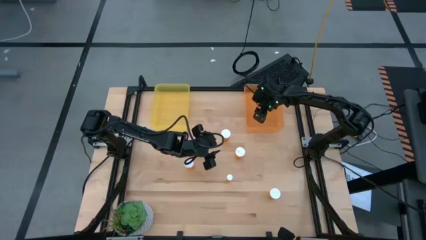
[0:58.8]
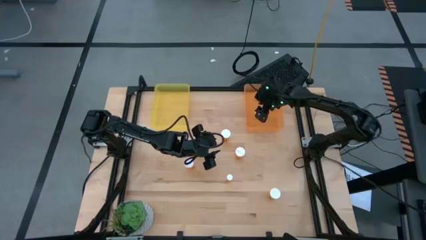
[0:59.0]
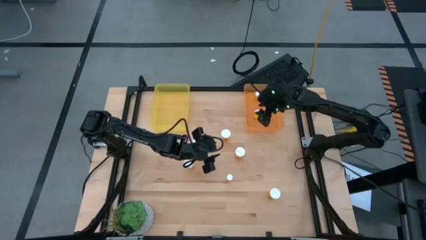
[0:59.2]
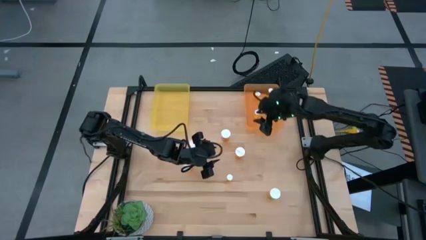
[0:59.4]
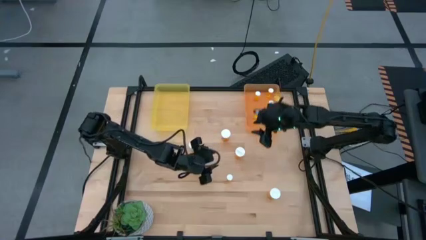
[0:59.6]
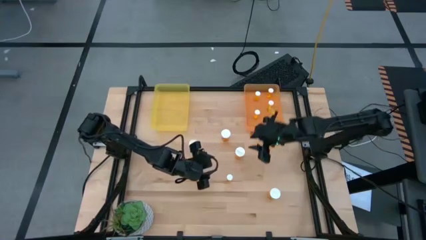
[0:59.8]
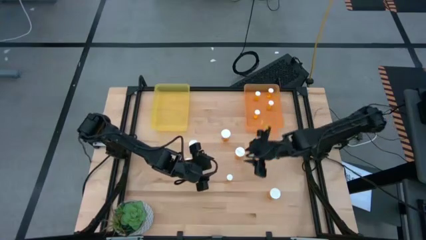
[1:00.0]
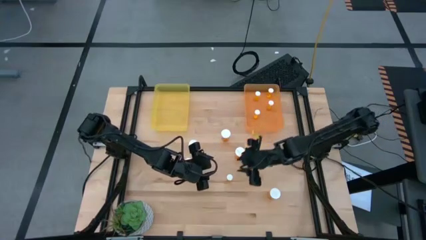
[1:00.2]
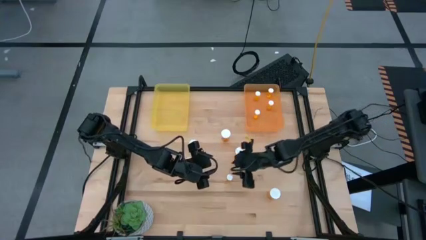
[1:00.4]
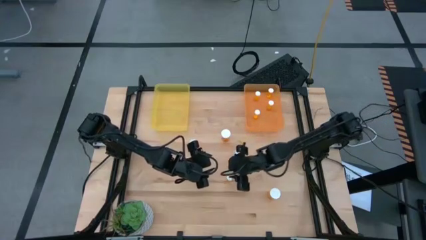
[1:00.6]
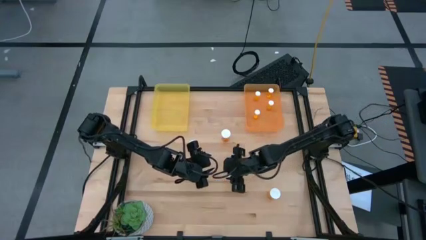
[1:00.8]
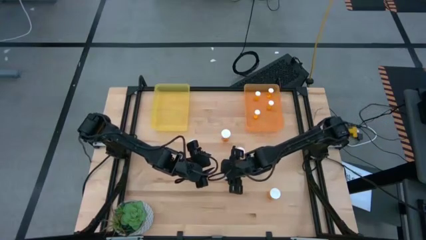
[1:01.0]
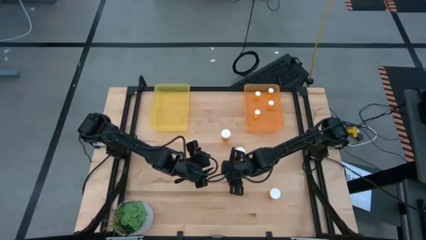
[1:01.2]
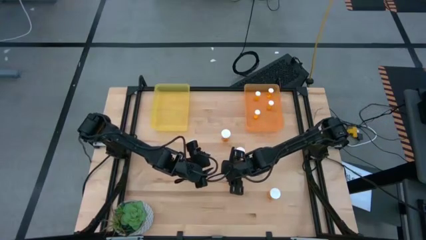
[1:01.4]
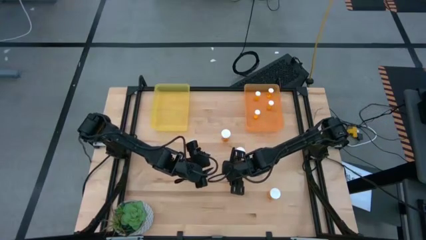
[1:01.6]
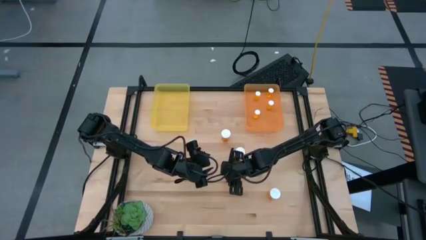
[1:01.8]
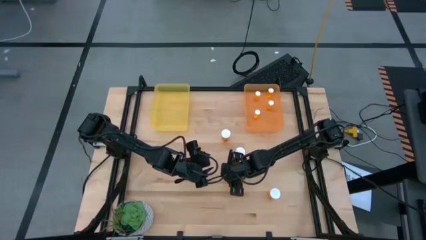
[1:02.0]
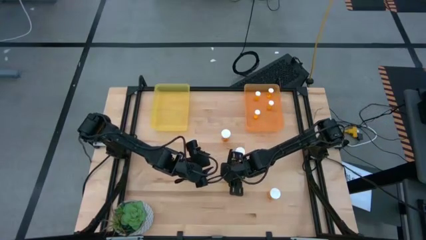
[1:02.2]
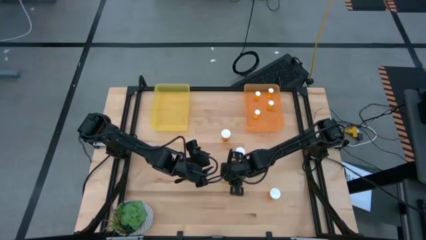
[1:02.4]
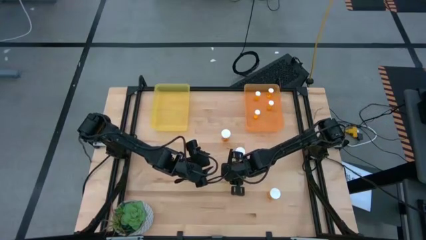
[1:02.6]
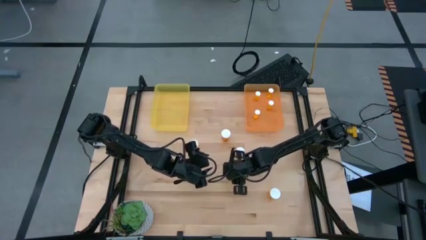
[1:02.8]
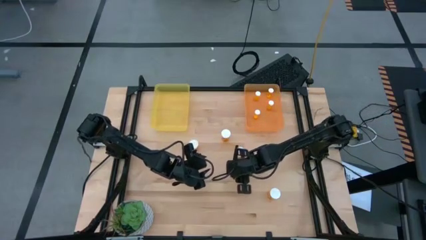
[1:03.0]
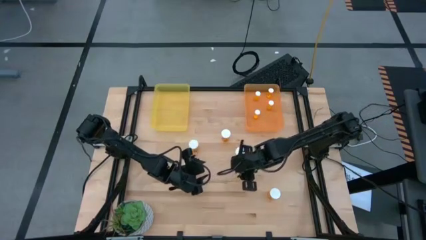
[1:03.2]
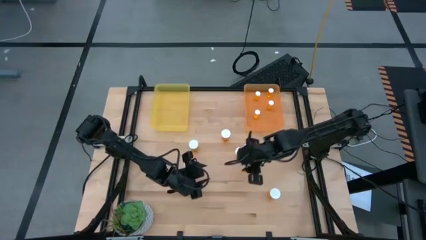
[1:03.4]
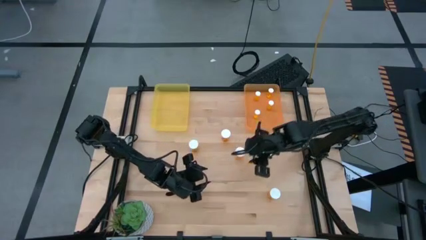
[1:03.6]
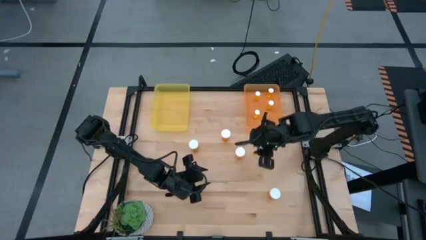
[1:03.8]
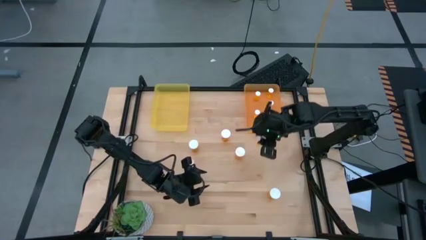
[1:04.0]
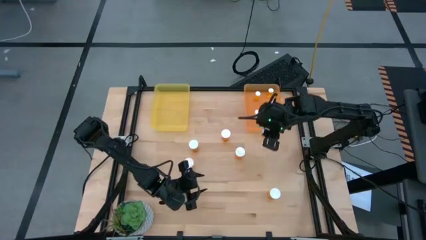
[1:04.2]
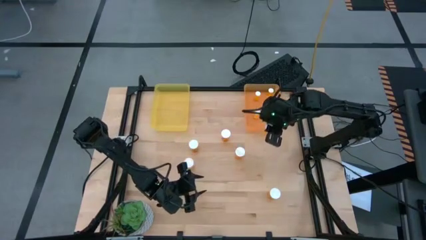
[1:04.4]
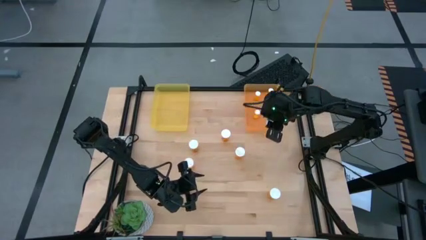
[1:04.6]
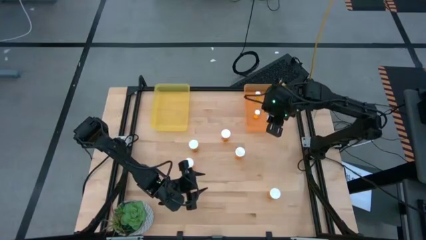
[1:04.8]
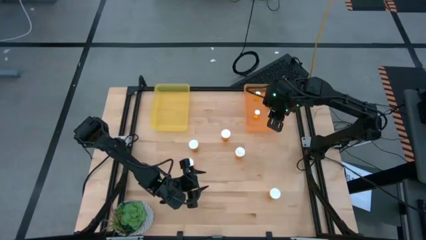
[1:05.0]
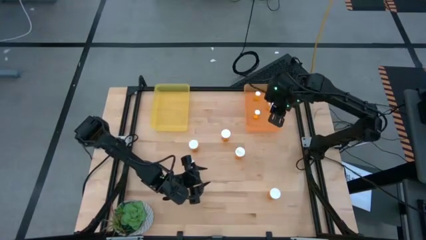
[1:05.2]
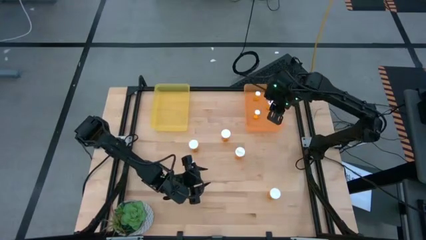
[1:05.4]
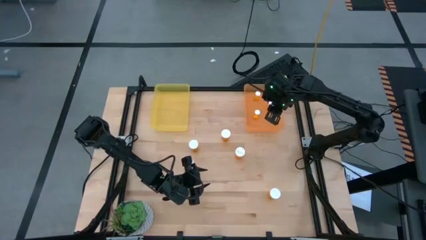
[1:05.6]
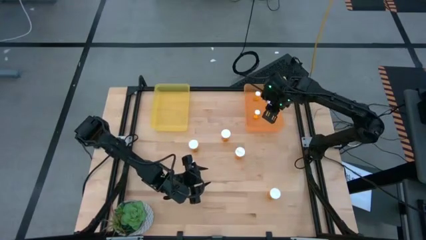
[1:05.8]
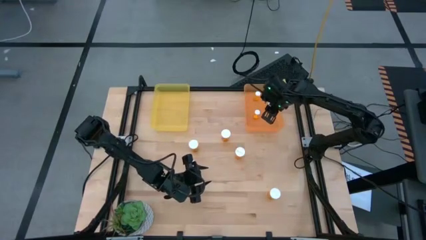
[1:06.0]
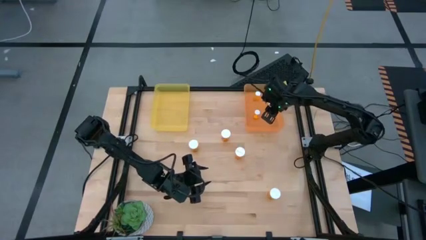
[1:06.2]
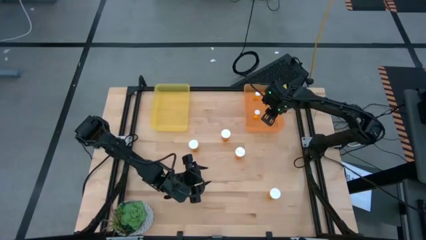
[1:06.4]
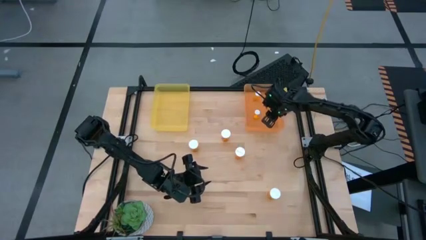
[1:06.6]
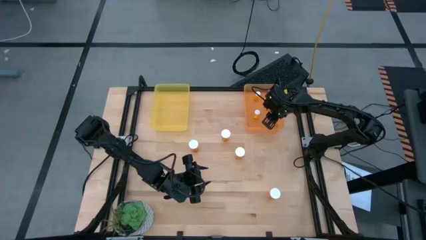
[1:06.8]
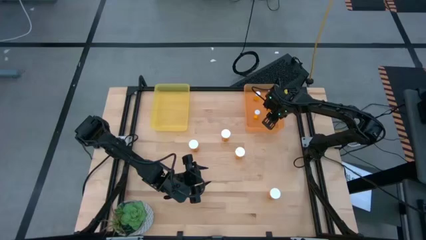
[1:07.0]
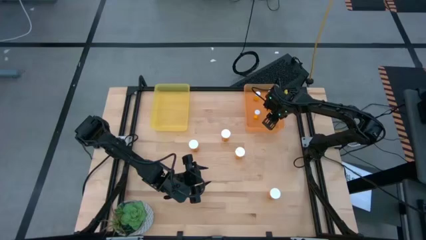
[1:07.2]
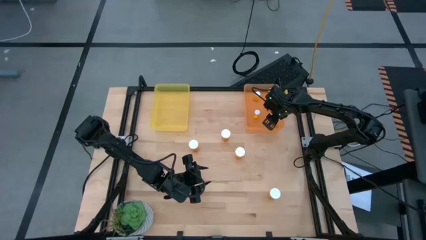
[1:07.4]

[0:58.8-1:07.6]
Task: Pick and place medicine bottles into bin by pill shape (circle, oval)
Put the small orange pill bottle into the orange bin

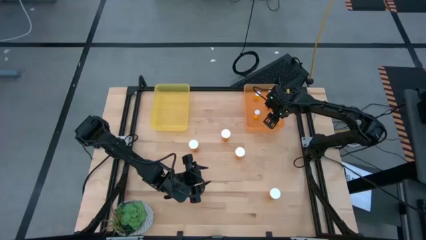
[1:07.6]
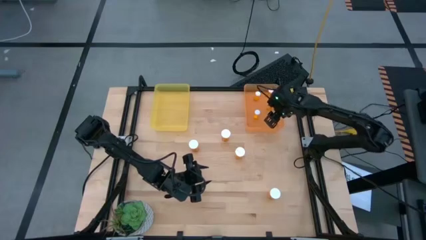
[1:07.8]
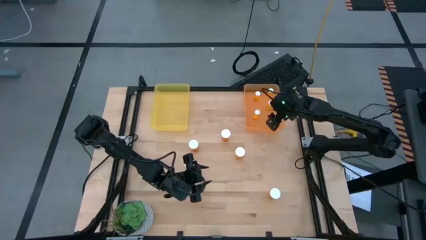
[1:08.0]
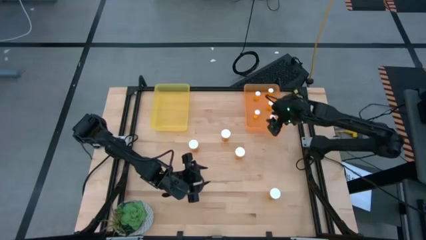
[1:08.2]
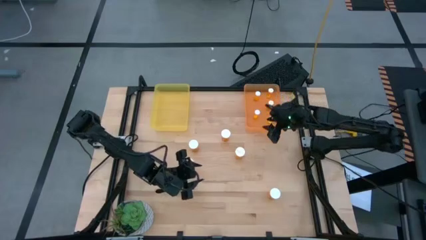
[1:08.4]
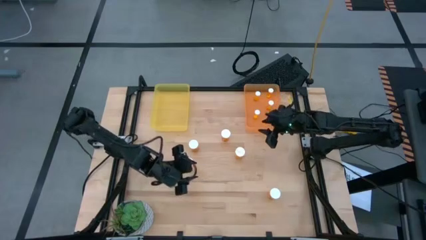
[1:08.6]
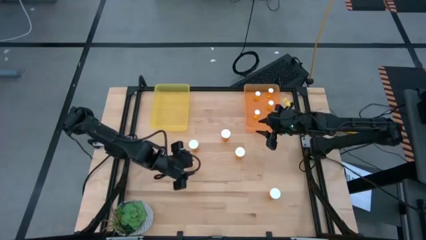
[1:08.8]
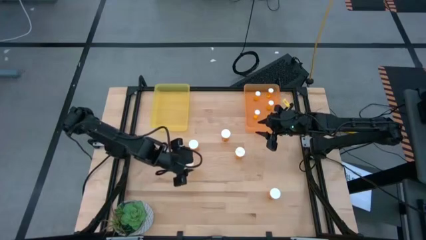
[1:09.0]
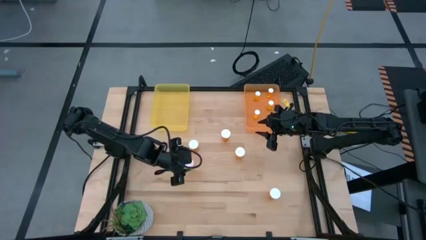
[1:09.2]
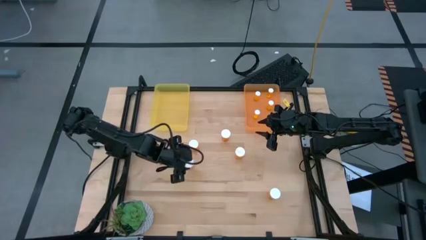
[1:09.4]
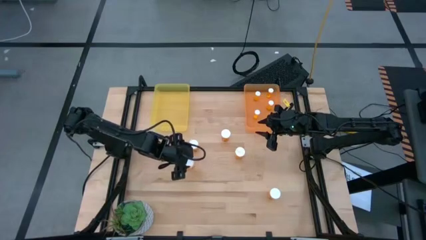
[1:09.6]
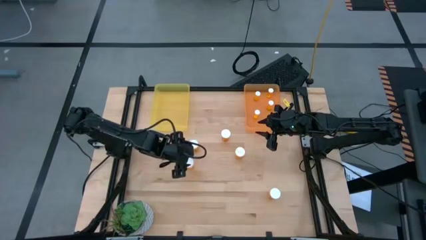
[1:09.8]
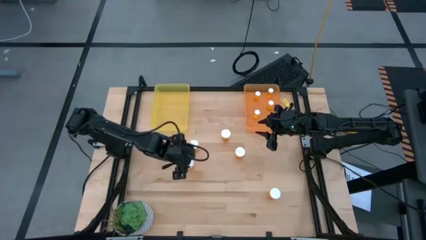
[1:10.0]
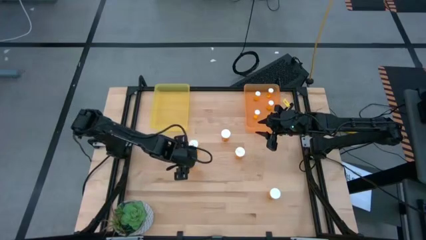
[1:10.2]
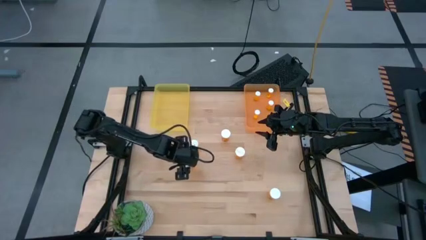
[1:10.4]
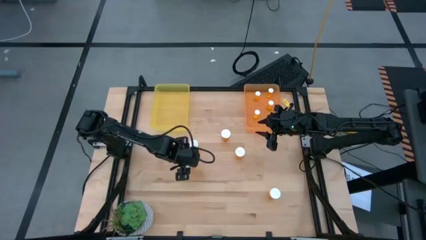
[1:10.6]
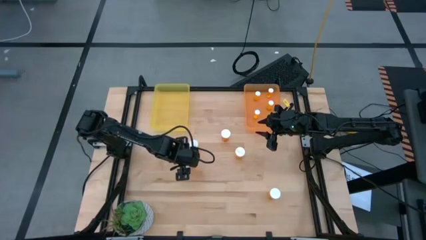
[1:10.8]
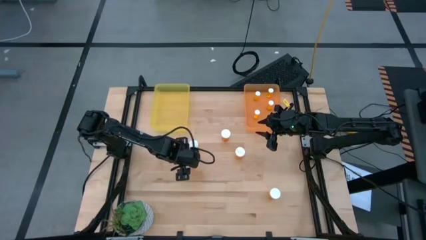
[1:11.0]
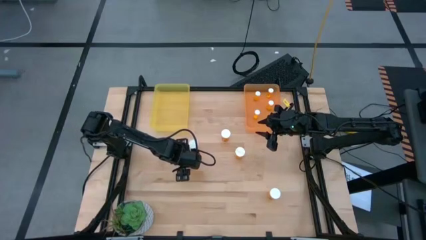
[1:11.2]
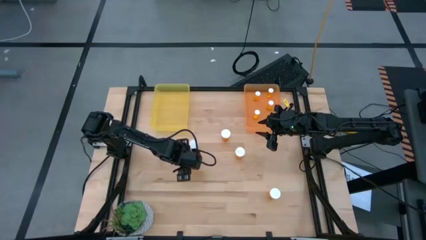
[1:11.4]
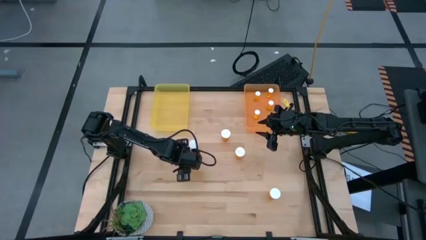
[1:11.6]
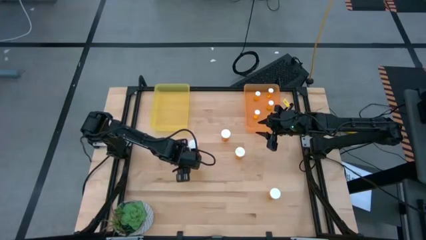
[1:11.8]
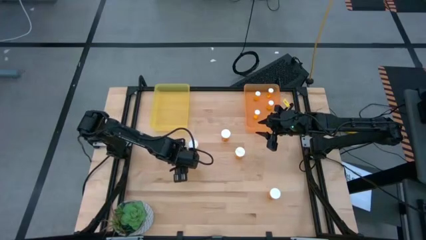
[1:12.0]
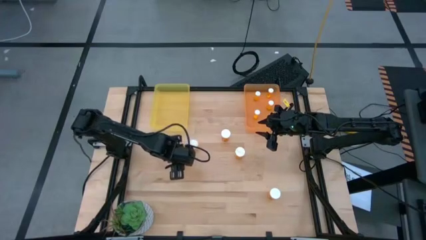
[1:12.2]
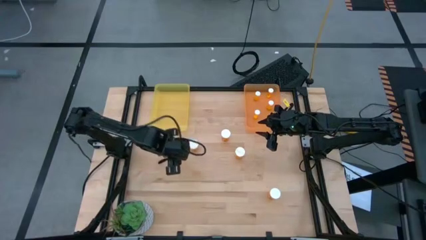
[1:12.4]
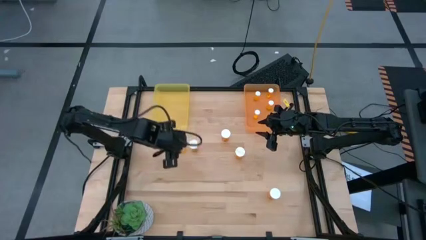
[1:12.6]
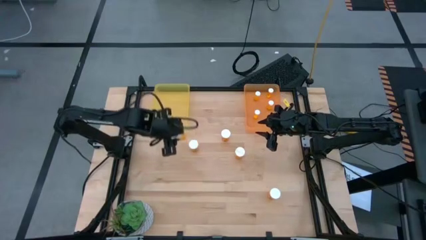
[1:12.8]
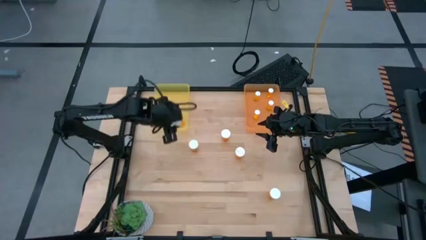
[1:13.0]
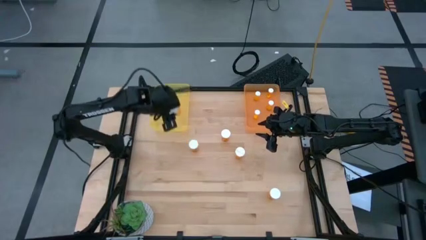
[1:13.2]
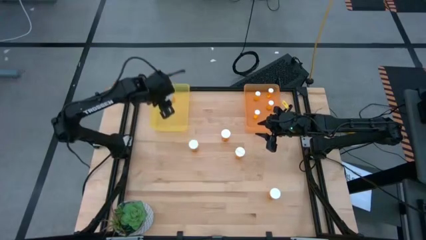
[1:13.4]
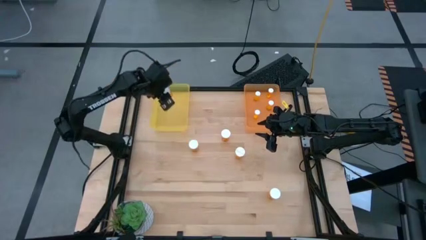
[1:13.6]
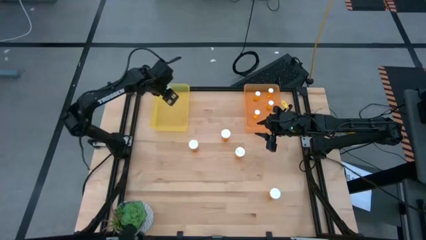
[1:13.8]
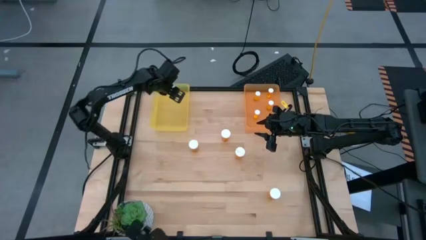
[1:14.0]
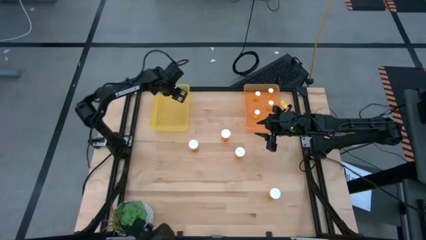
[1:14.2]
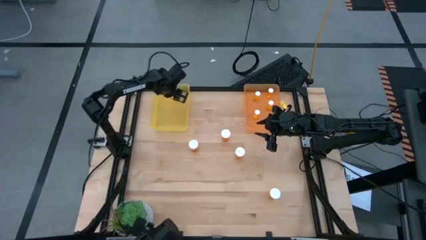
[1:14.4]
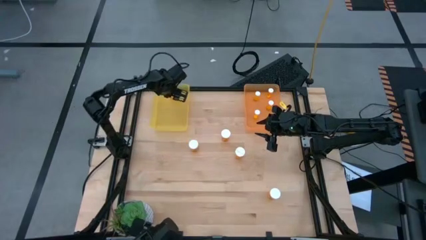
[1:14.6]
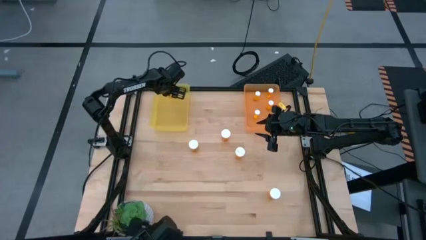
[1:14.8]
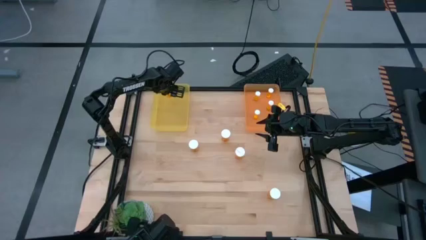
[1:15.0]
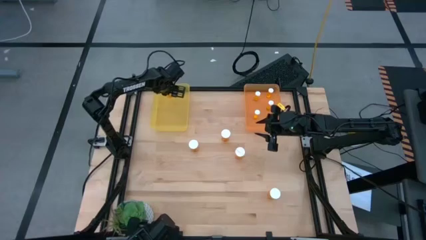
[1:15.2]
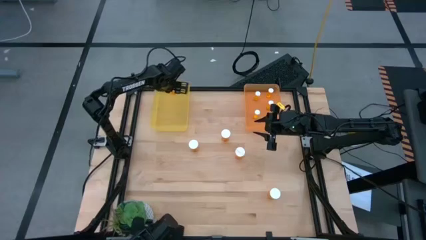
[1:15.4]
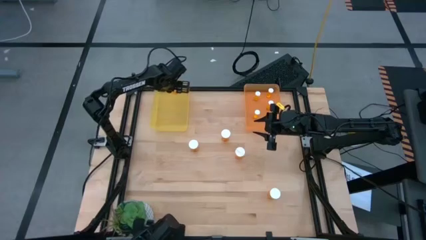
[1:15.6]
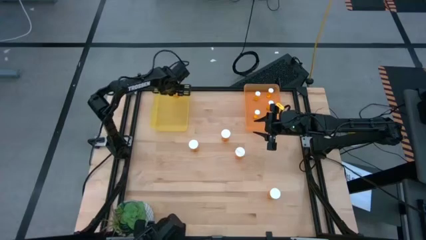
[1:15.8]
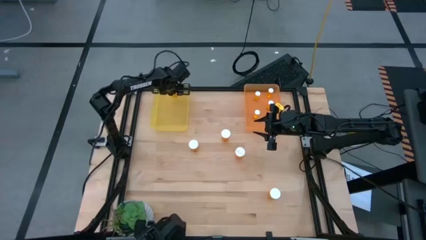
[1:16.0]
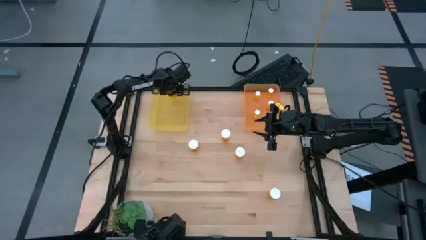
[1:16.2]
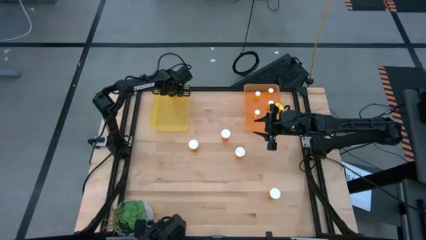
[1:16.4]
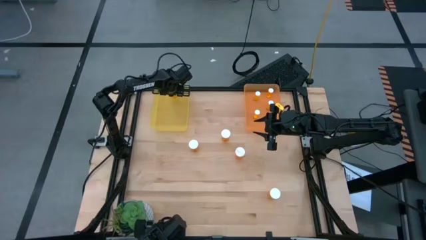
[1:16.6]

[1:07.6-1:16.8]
Put the large orange pill bottle into the yellow bin
